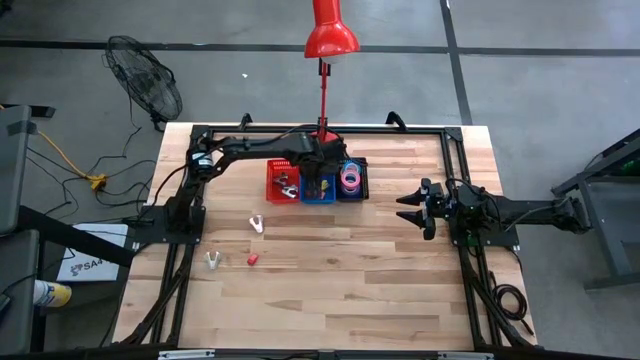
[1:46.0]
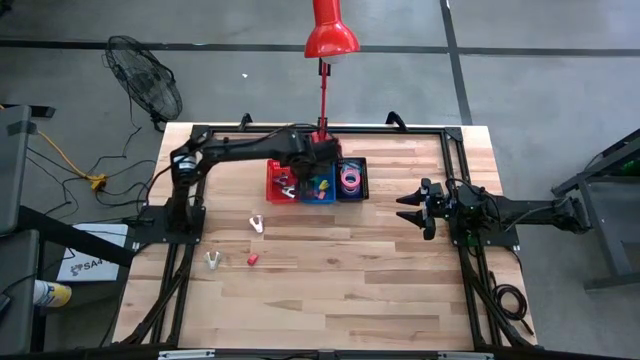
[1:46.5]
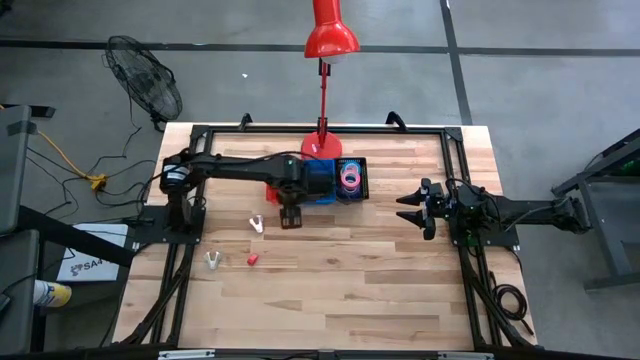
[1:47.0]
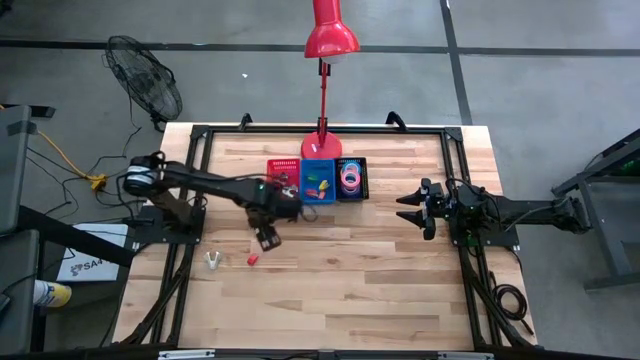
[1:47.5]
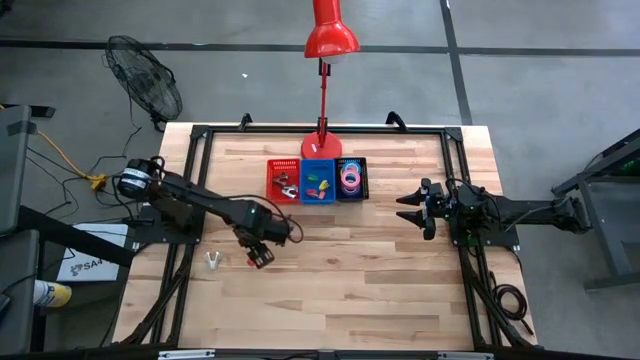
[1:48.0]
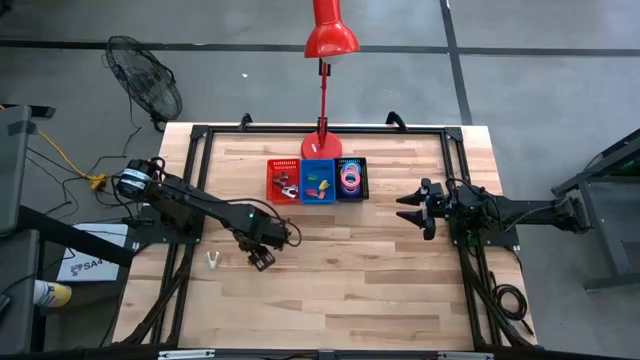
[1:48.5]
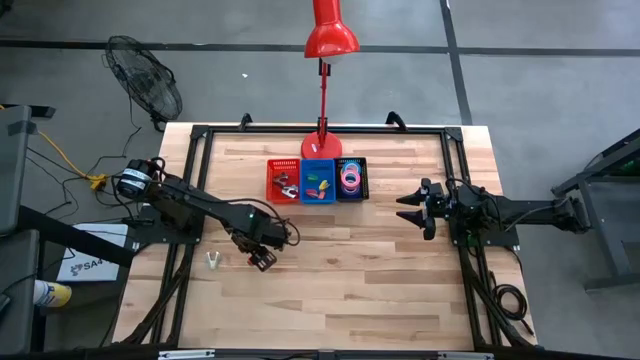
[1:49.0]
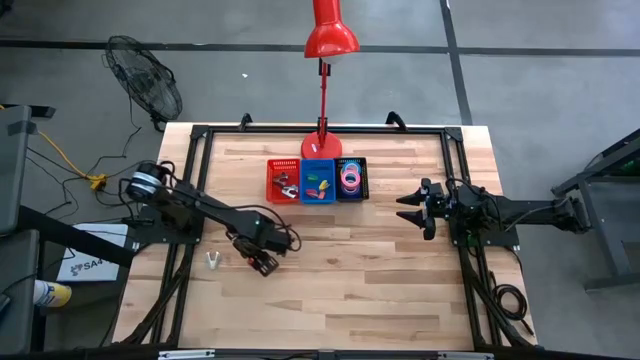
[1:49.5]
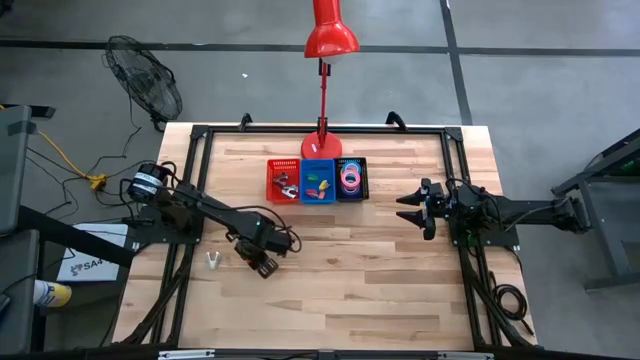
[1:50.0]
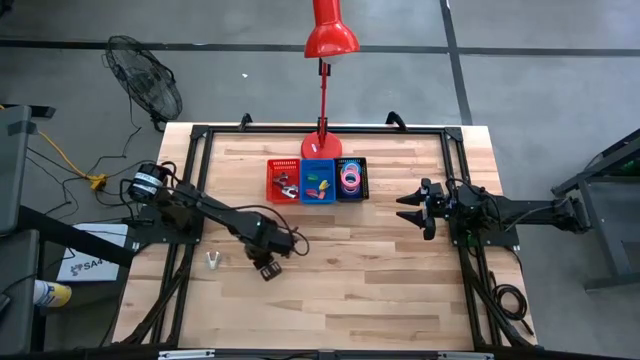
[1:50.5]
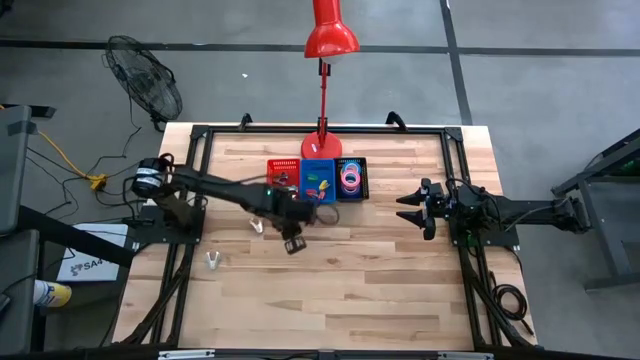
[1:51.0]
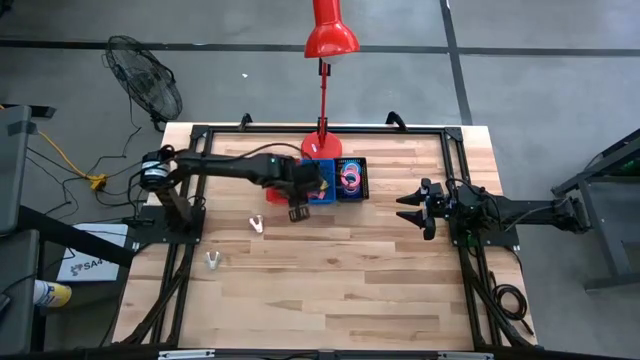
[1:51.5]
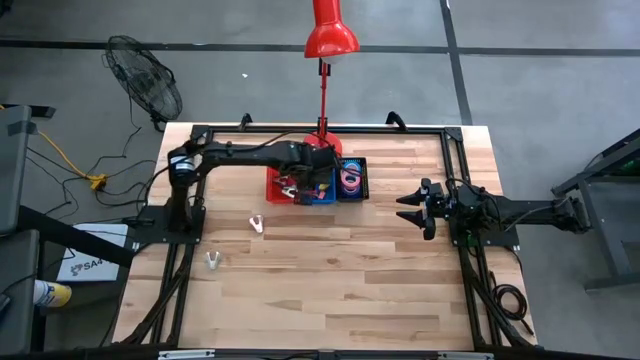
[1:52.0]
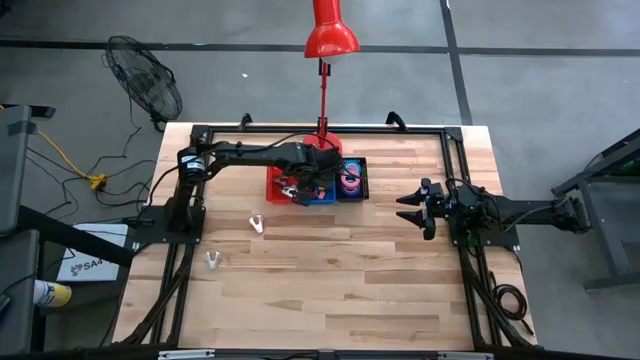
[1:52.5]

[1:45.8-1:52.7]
Task: Pick and place Stapler, Stapler remover, tape
Put the red stapler into the blue basket

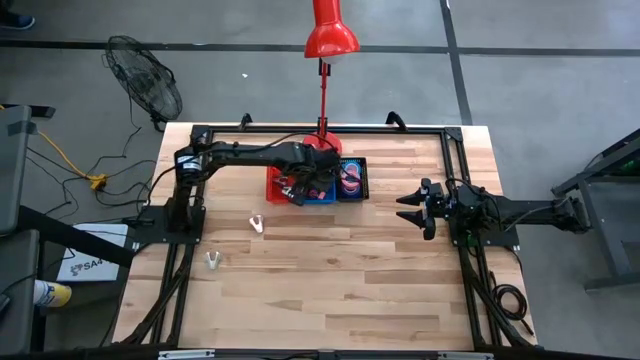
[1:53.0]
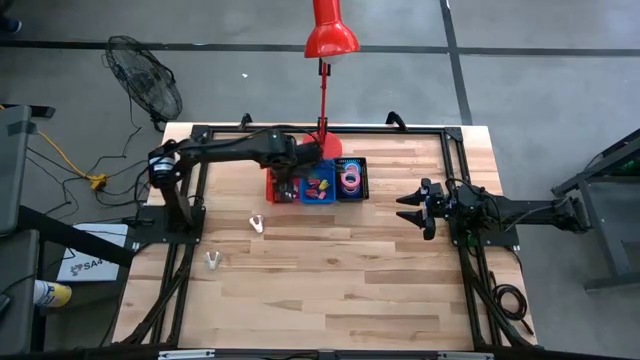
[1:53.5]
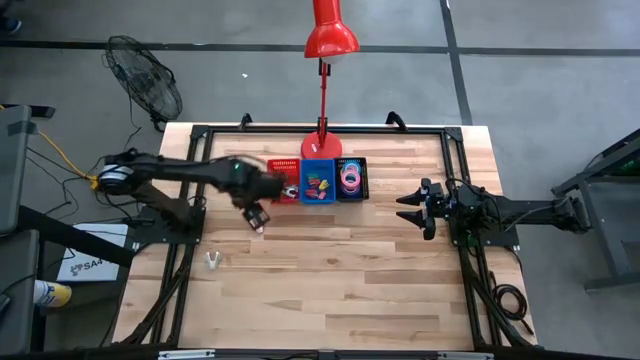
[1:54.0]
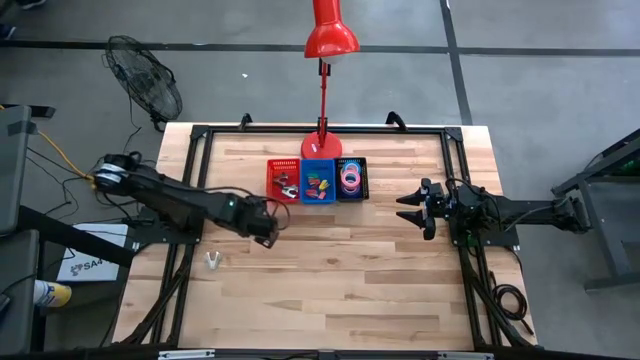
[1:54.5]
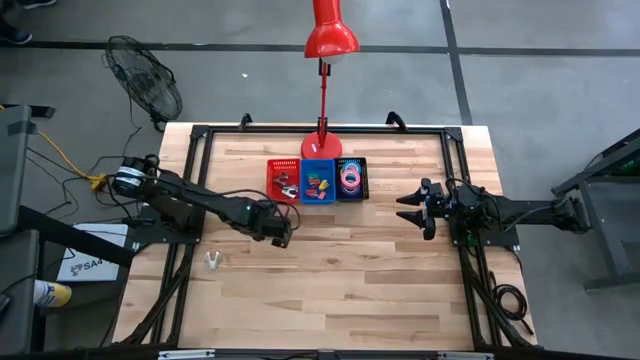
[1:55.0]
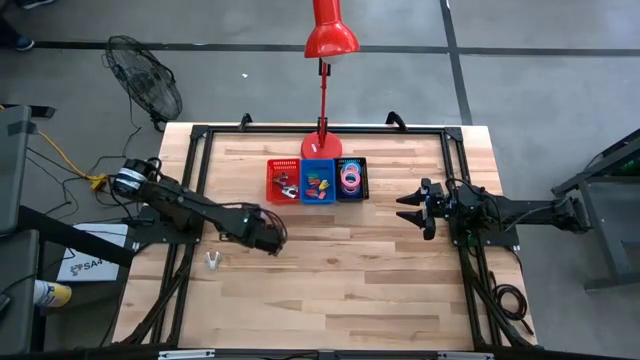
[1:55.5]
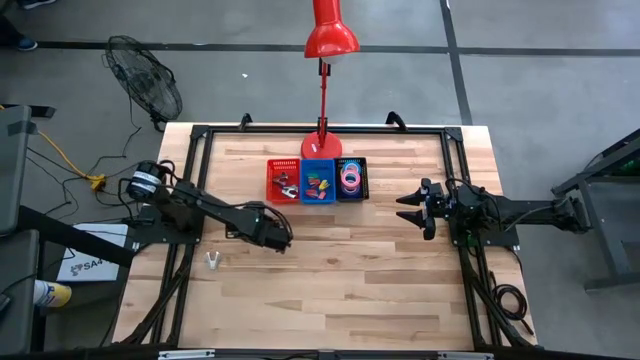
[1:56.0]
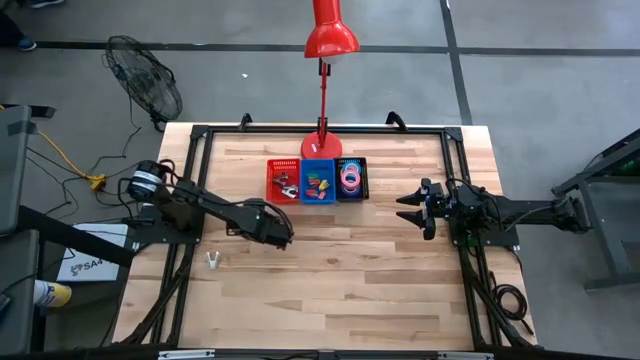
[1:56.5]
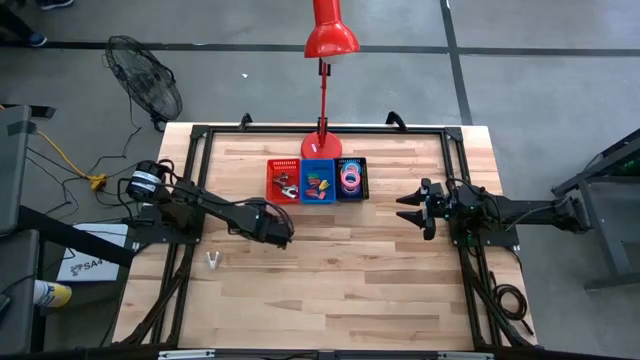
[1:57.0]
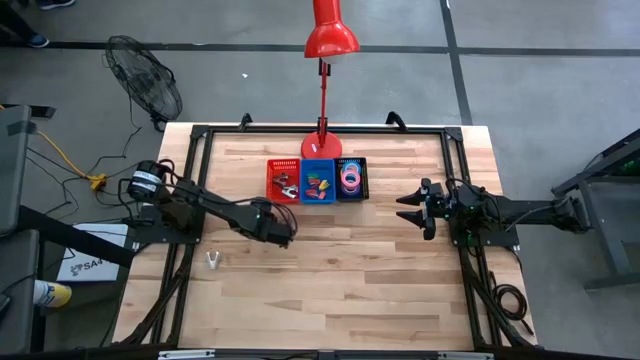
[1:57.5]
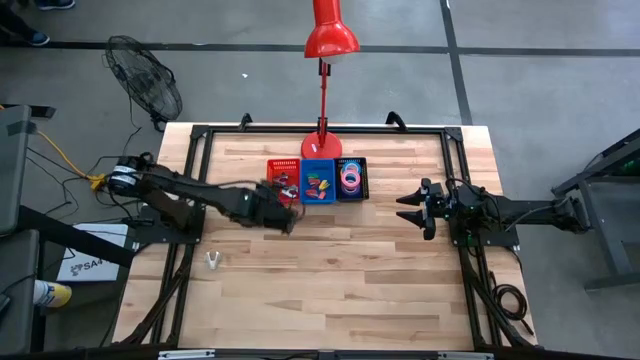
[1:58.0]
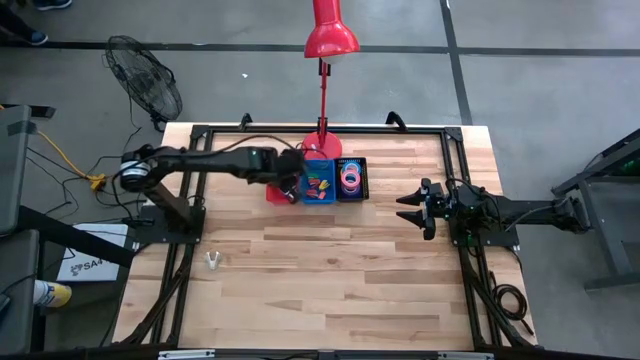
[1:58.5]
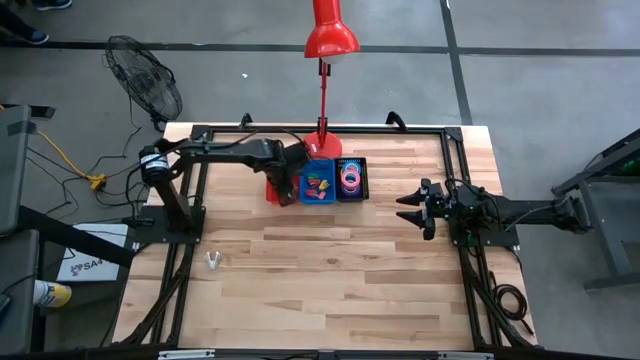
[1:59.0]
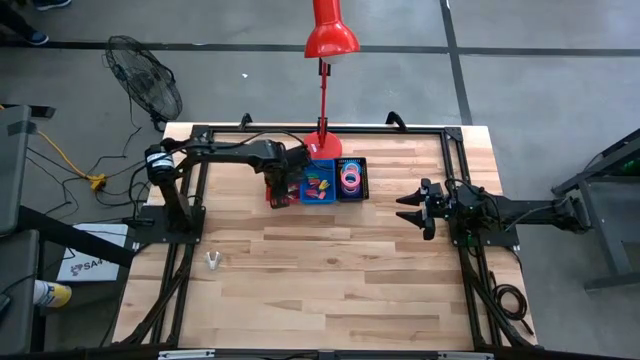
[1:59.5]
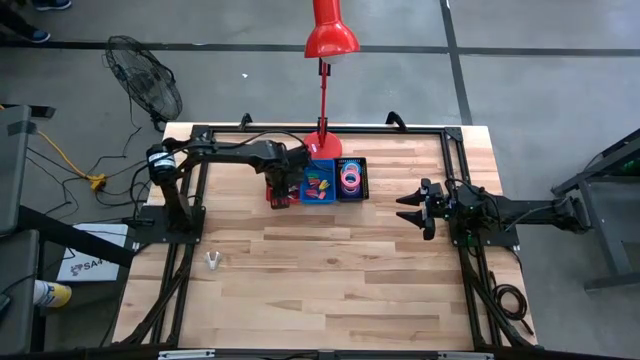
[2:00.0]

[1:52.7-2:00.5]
Put the pink staple remover into the red basket

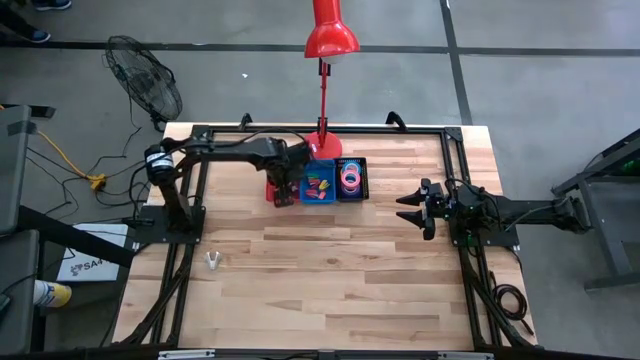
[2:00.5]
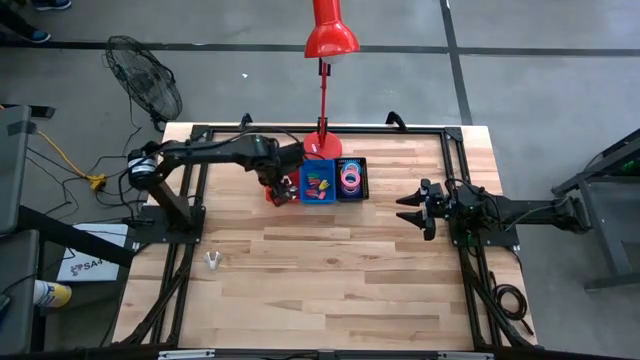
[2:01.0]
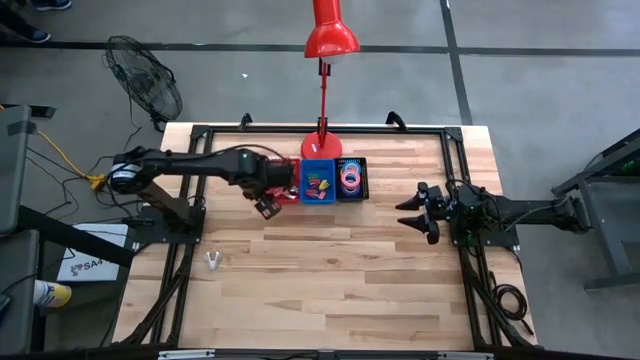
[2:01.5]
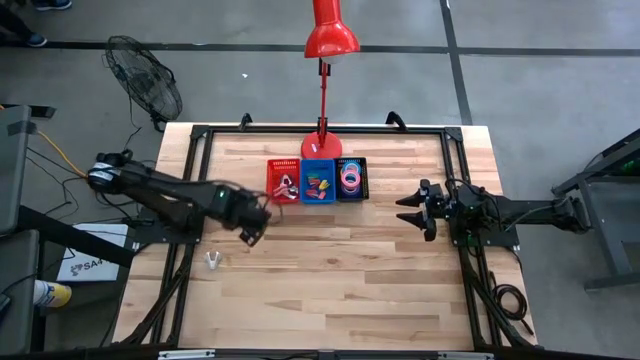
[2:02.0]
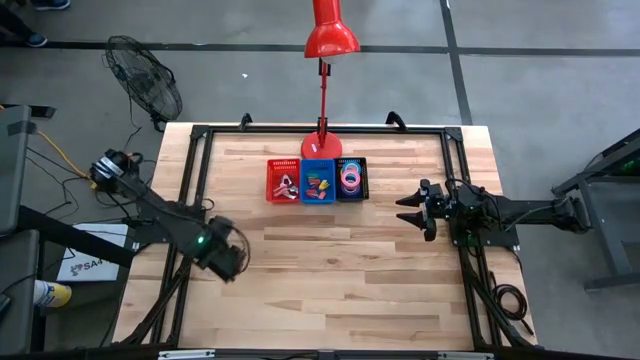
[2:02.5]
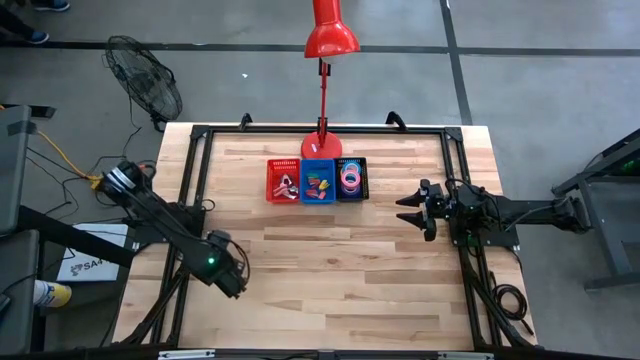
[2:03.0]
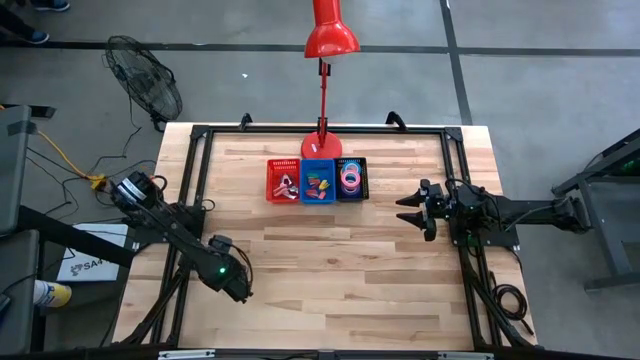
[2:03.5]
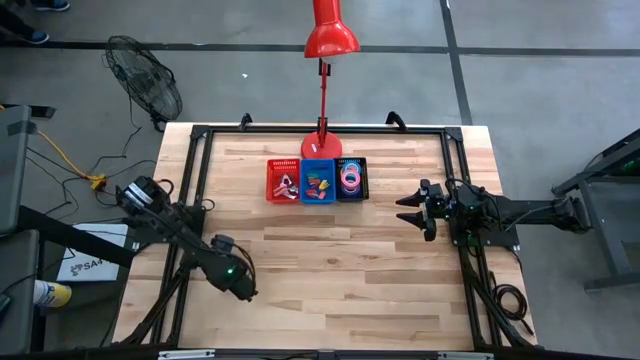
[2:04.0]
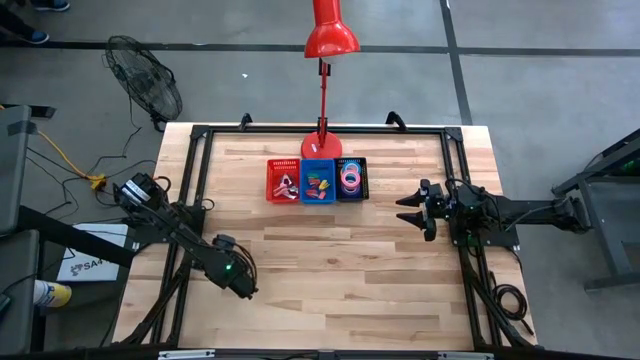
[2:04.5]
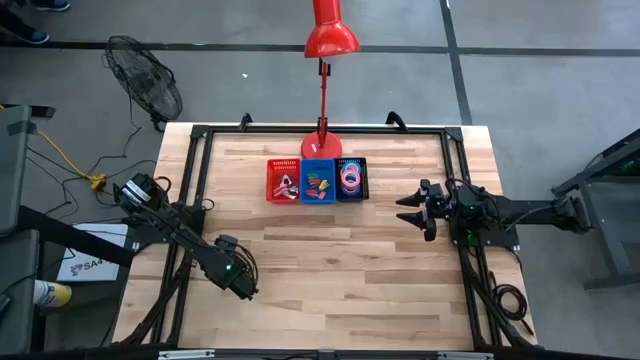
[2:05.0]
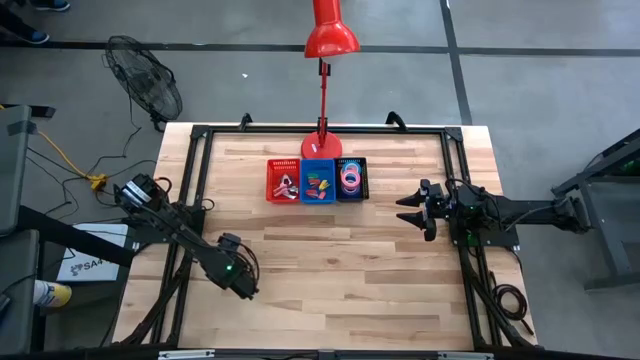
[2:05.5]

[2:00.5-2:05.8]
Put the gray staple remover into the red basket
